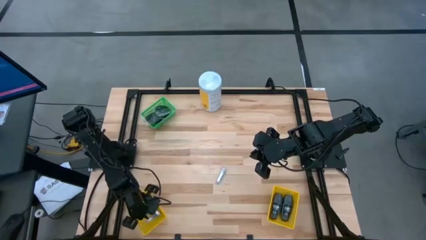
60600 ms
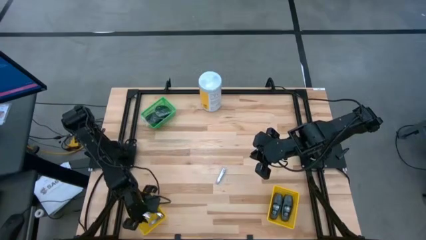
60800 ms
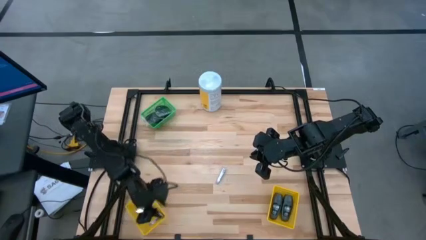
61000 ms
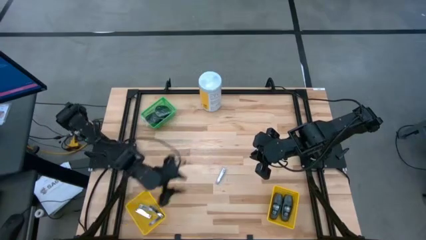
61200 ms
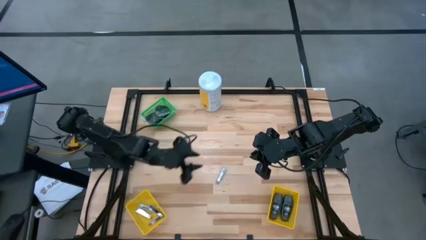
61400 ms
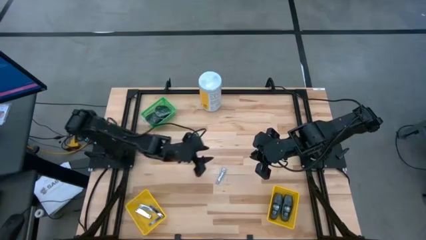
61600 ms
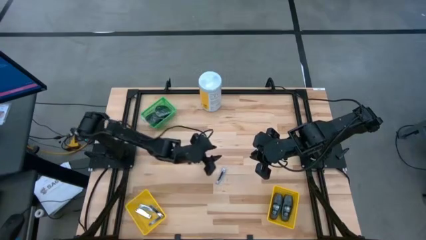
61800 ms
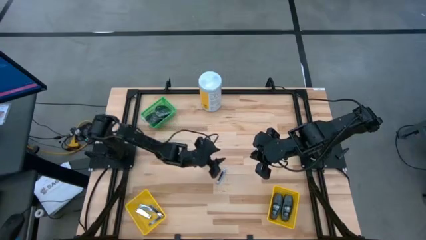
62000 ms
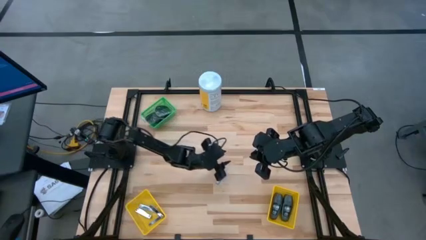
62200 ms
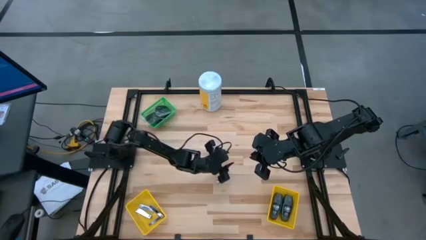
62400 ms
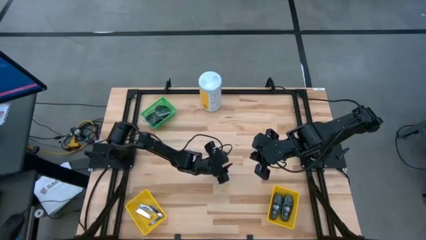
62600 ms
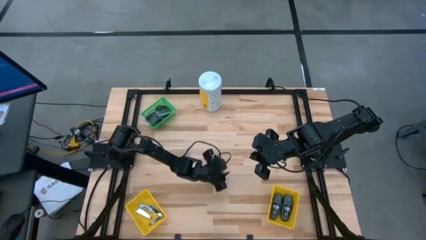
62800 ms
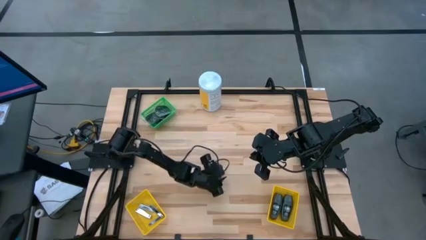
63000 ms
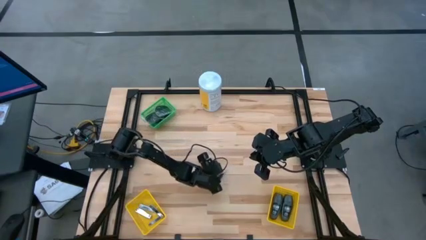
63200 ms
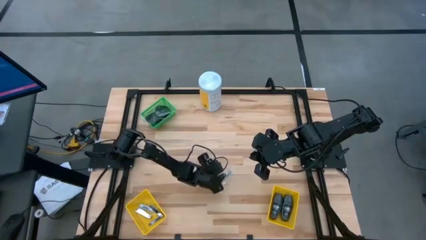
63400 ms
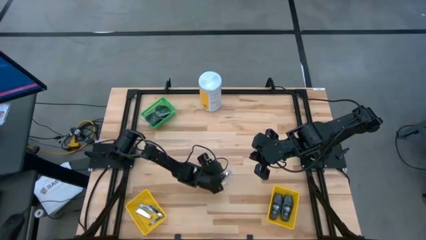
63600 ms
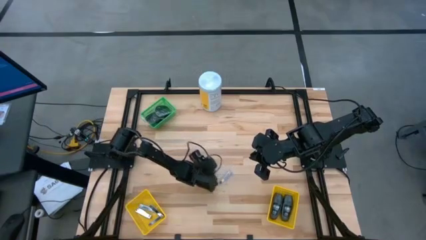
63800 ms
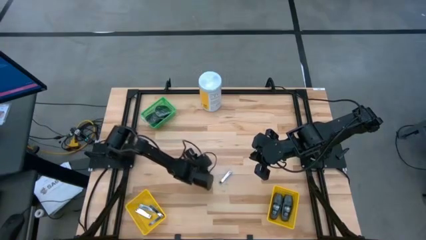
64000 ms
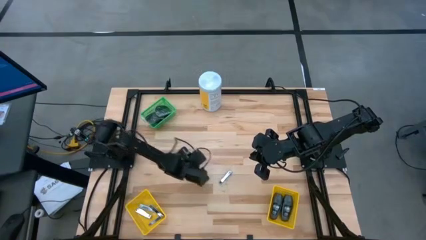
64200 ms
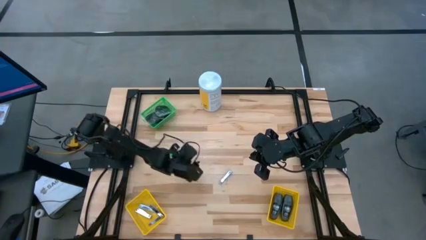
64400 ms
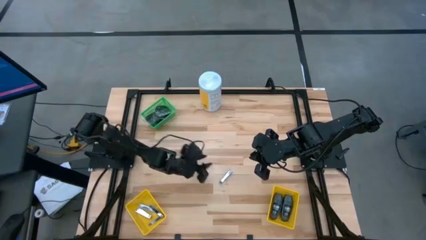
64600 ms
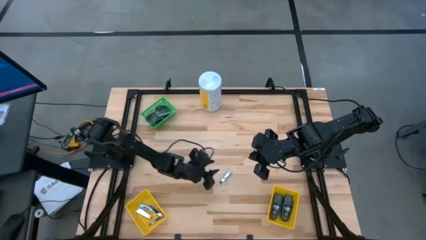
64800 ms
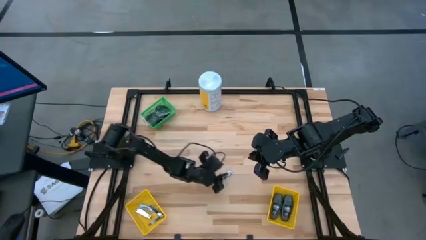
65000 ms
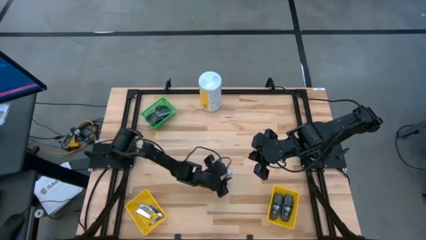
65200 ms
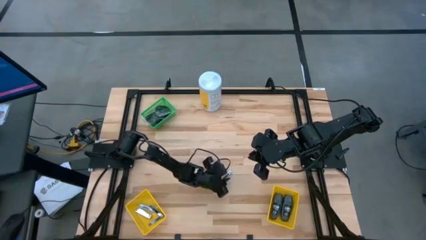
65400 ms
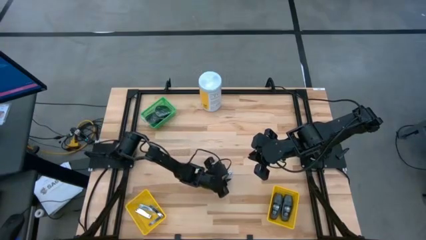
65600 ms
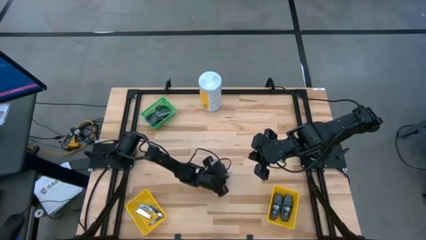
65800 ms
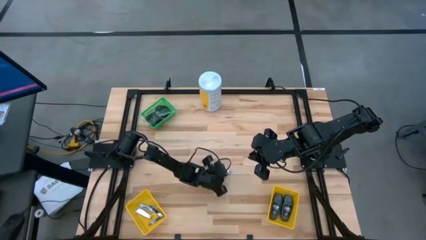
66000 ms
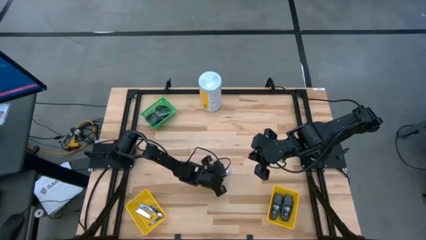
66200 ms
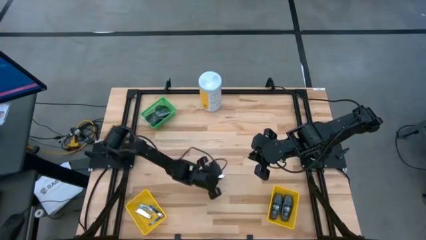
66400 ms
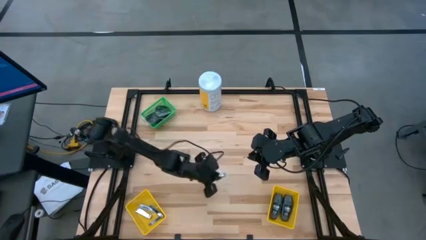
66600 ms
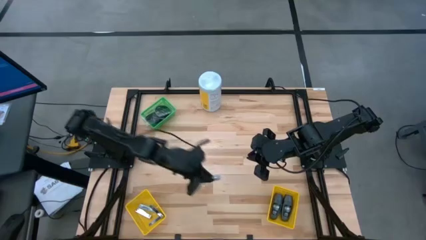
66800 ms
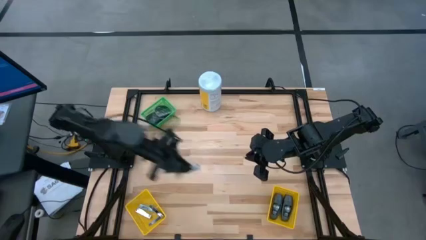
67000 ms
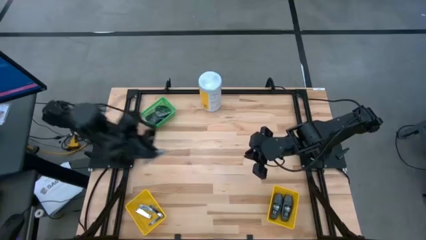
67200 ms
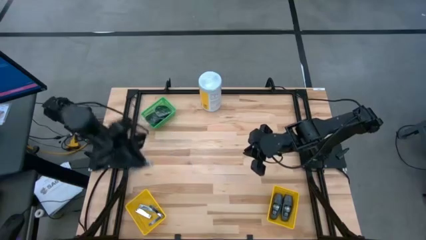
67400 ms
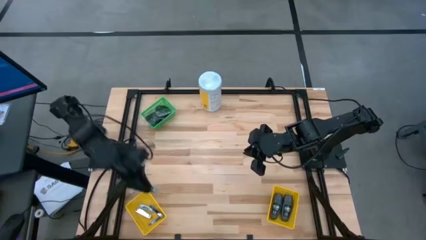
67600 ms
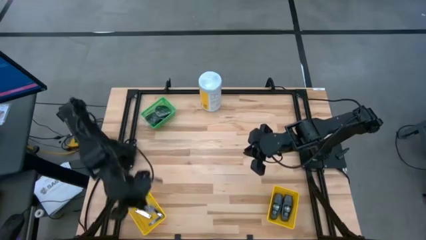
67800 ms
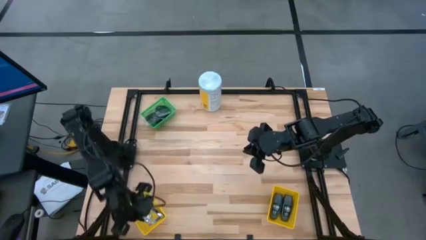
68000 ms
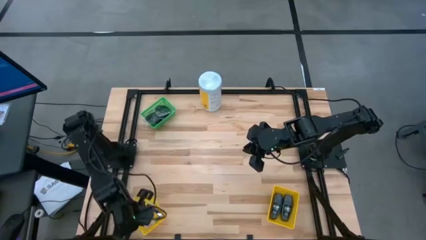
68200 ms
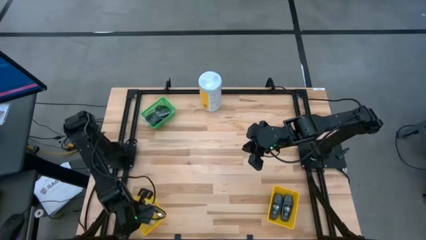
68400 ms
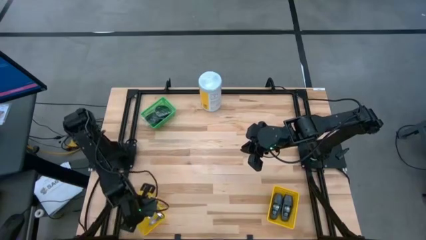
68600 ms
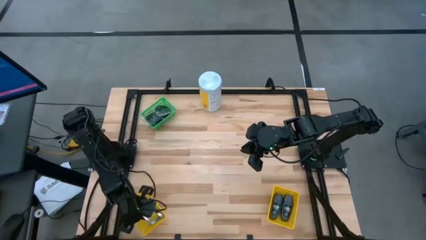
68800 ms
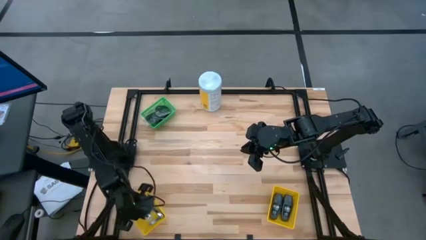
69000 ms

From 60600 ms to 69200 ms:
Task: Pick & Place Travel size toiletries
Put the nail cutter into the left yellow bin

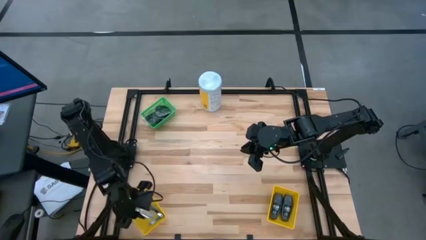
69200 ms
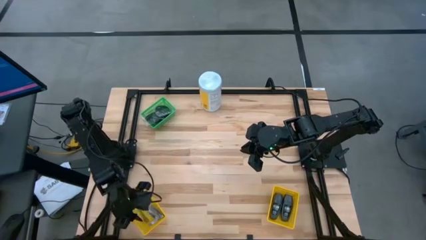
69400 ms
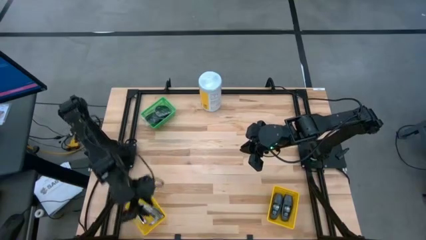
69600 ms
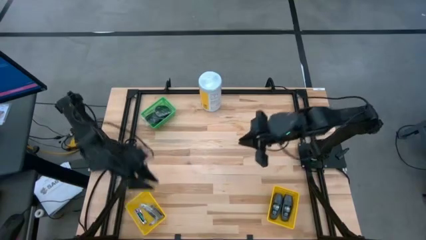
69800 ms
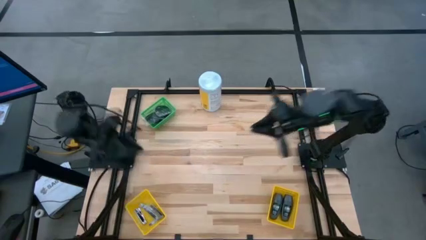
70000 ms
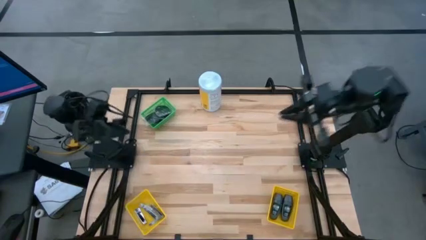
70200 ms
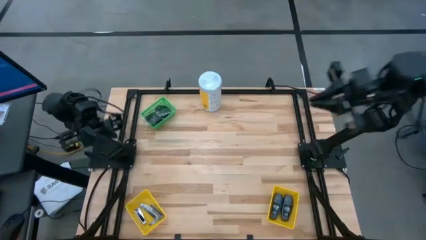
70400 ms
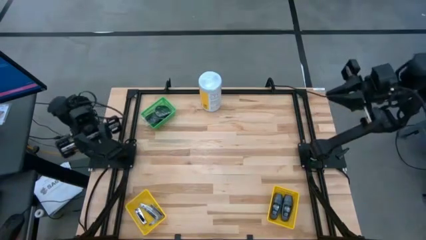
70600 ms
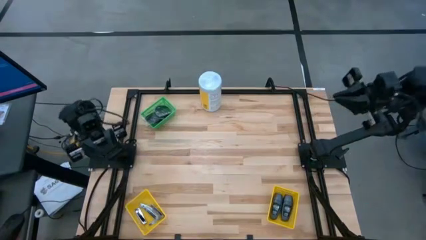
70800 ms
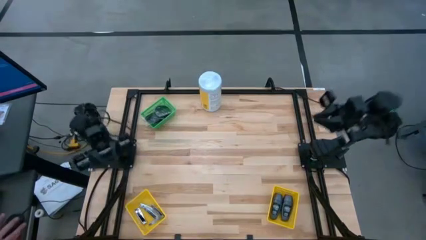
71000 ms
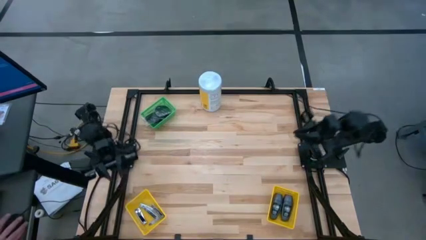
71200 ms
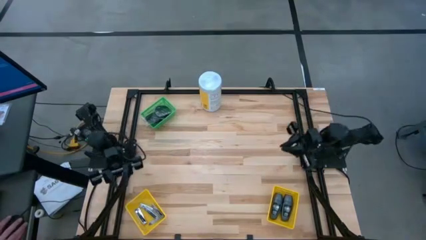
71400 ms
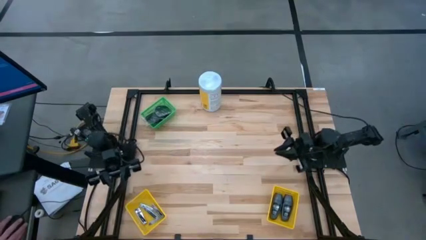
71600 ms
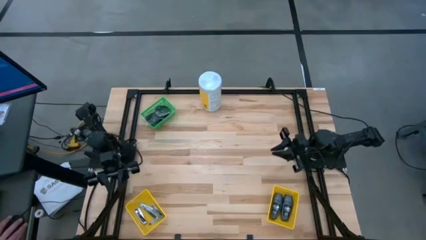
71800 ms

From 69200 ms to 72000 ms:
Return to Home Position

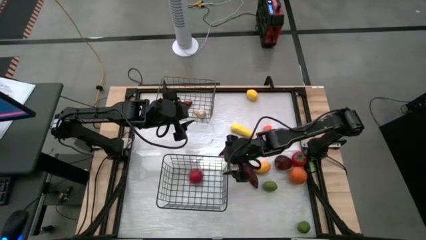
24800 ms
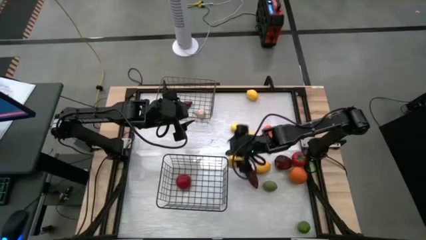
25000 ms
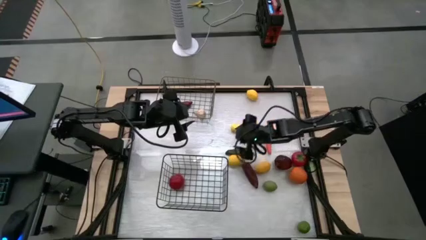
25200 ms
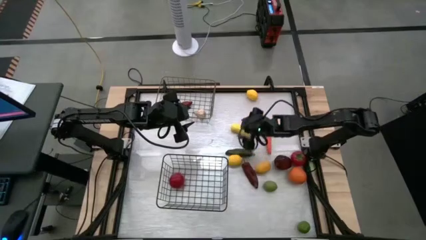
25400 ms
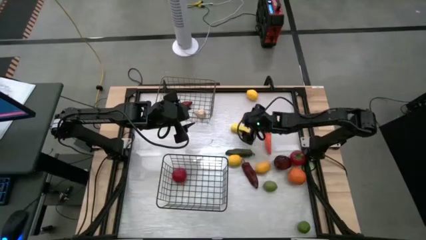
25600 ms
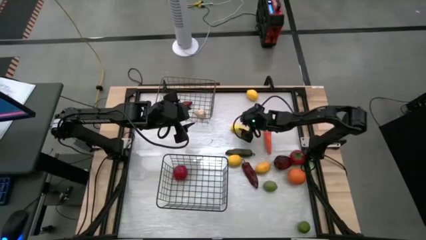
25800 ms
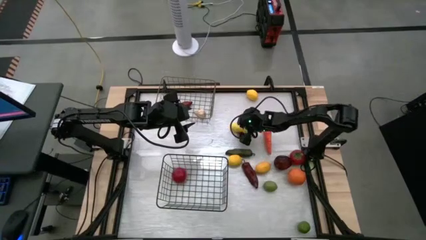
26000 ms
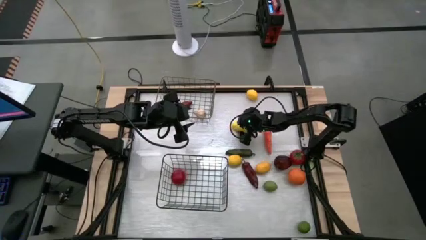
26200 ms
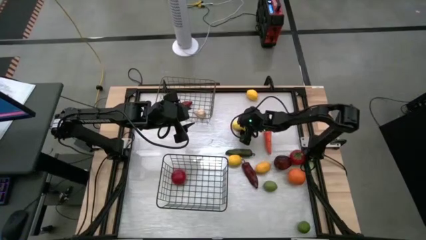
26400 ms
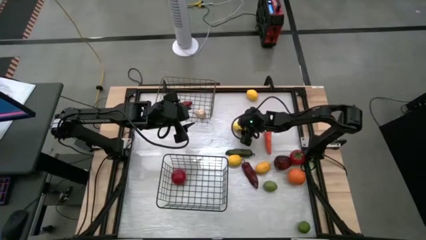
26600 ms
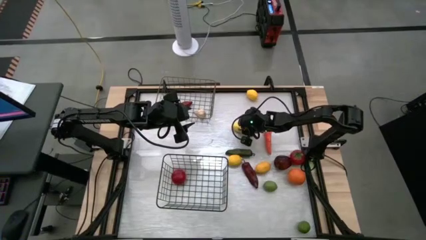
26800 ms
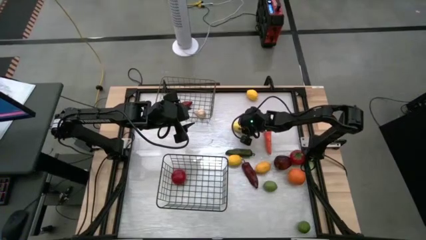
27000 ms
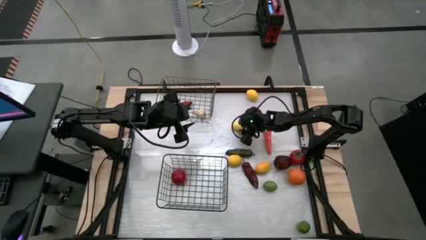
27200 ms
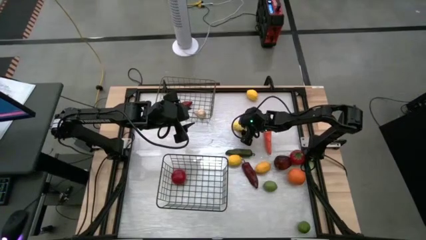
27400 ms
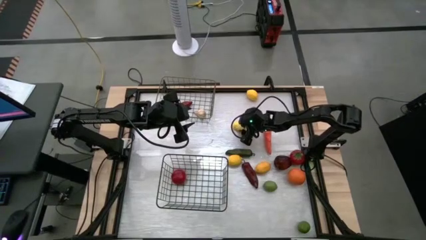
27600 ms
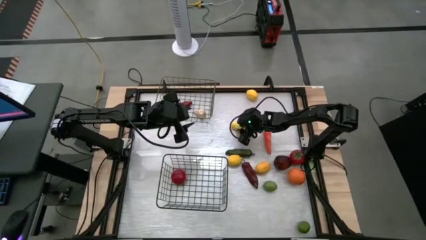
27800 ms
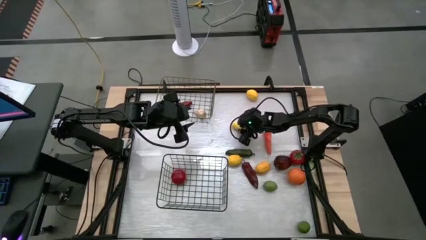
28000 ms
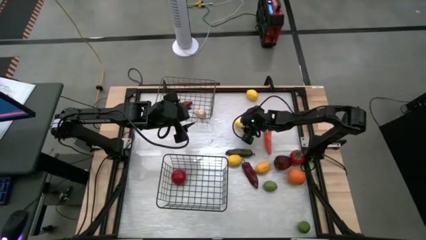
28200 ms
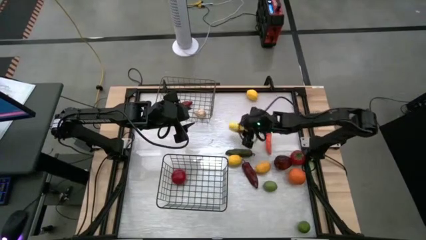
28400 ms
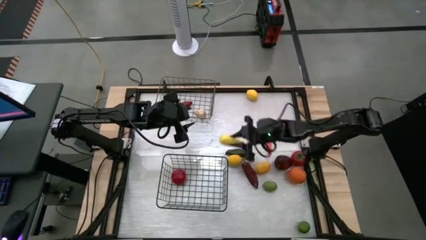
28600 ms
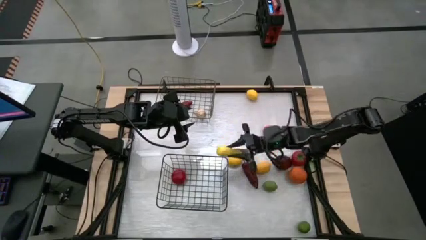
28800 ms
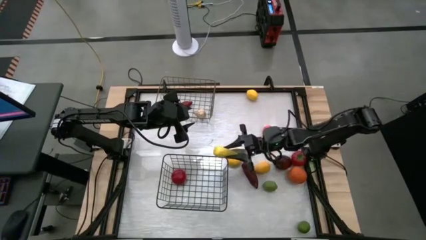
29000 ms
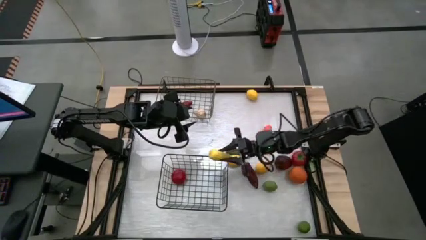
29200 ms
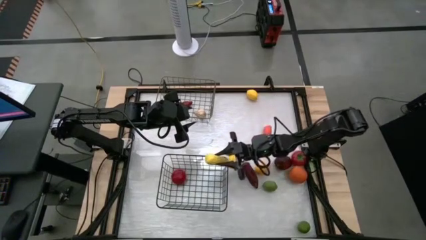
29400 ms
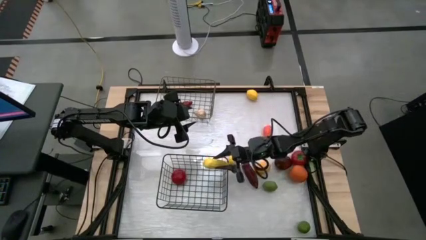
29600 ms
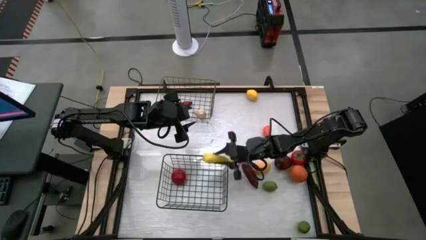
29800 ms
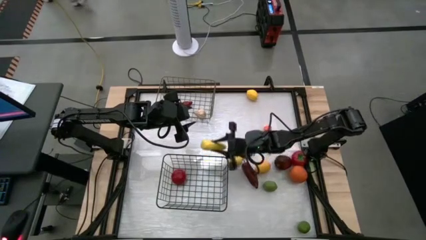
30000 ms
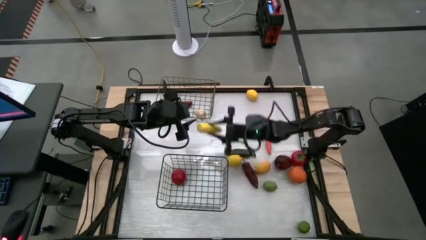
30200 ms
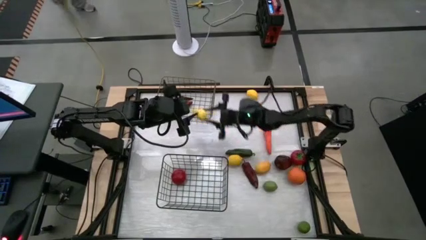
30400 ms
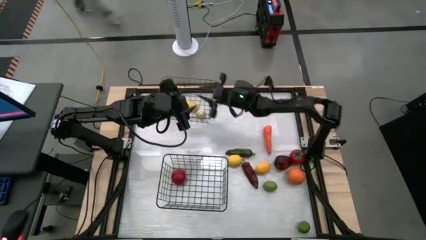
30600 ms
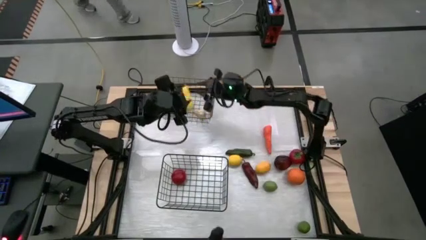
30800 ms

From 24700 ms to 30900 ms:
Task: Sort produce into baskets
Put the yellow corn into the top wire basket
